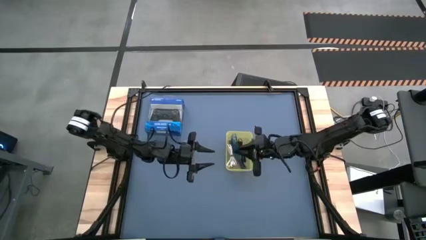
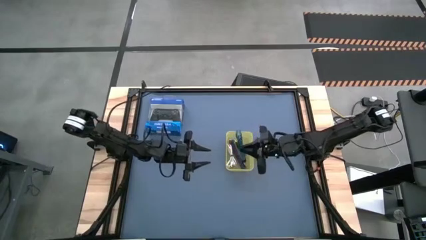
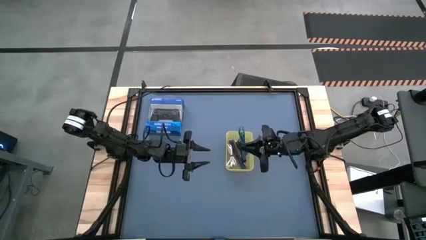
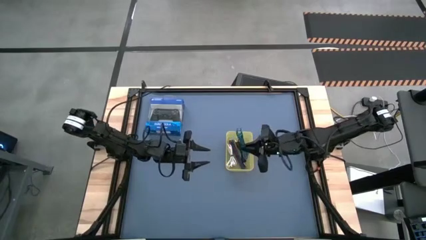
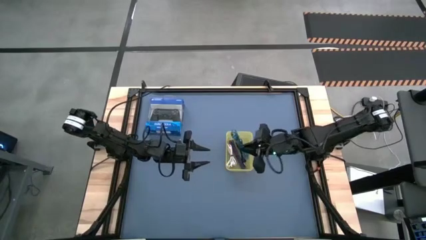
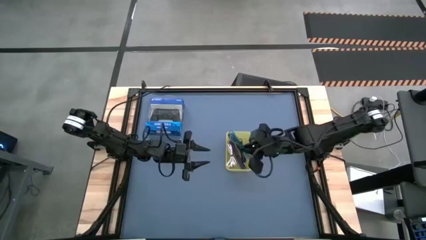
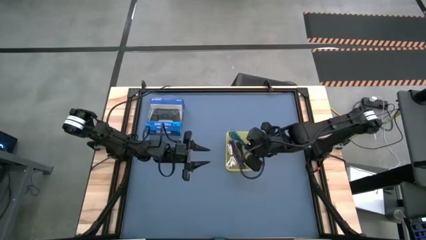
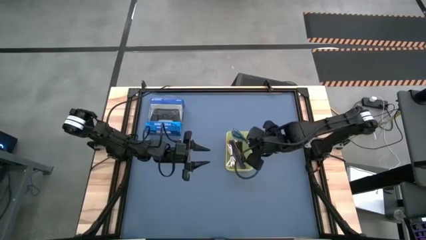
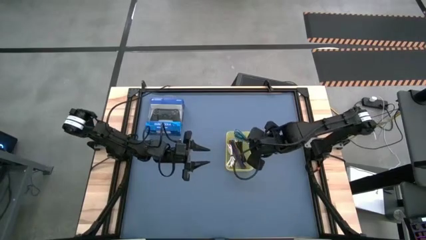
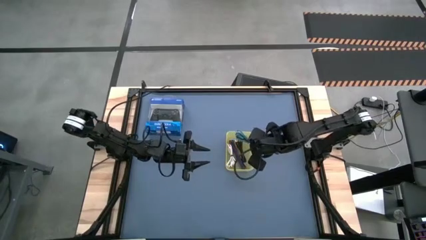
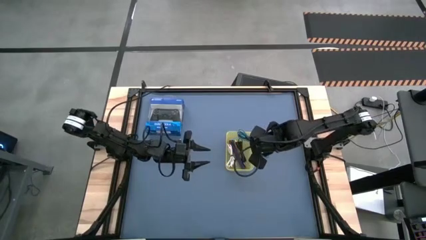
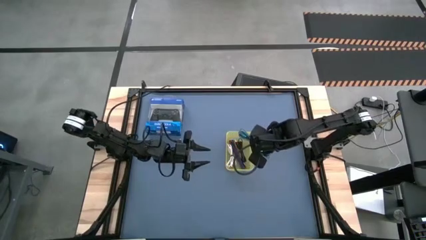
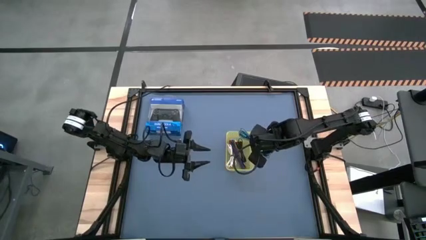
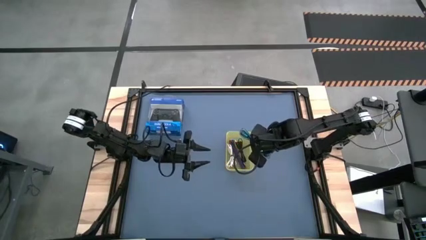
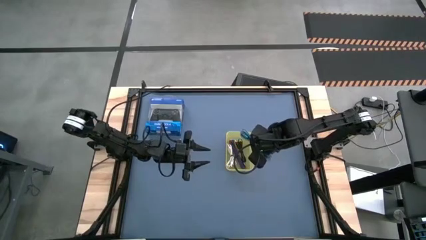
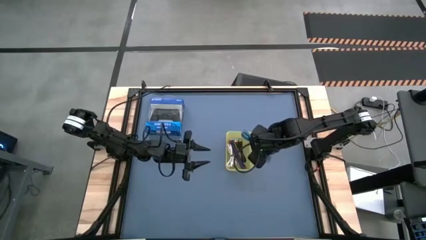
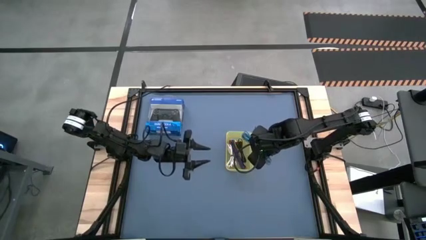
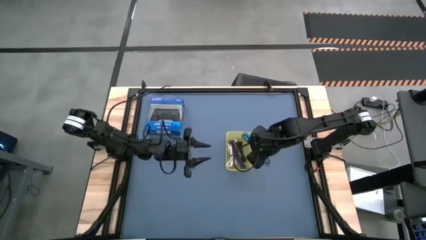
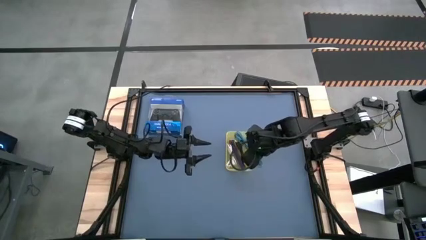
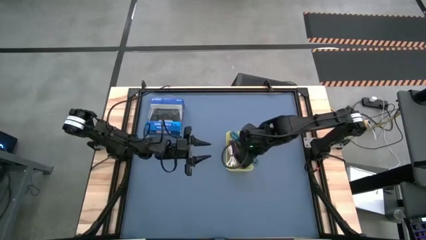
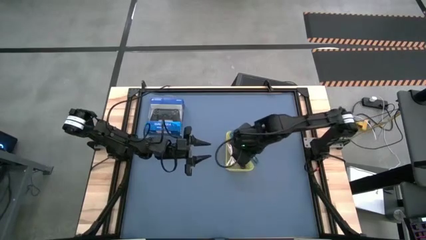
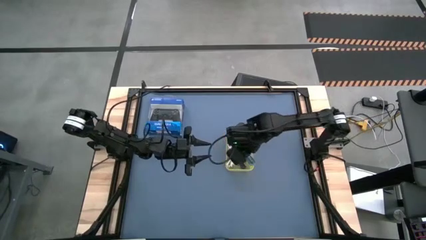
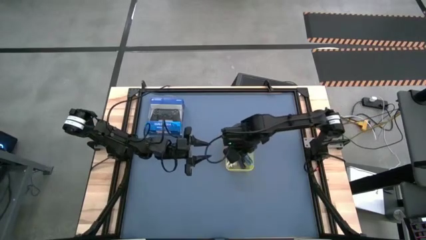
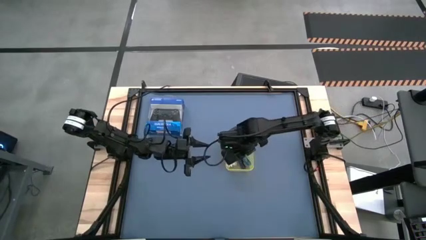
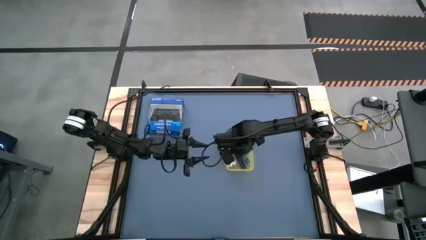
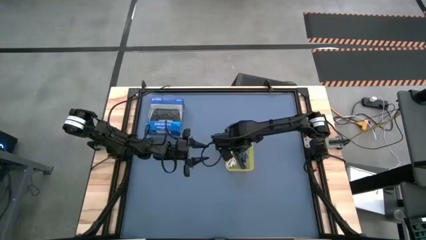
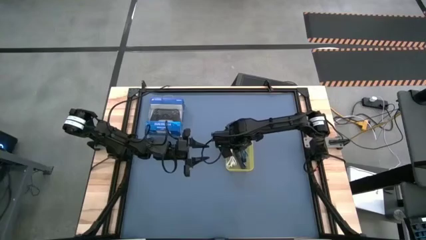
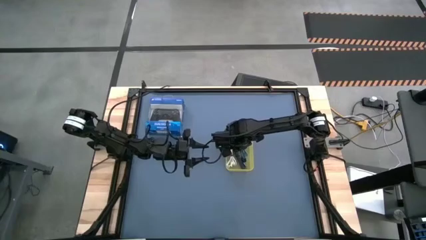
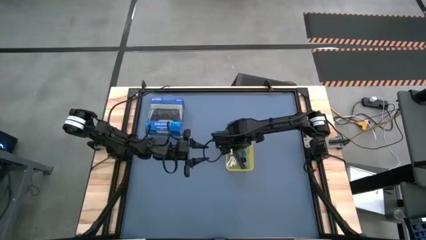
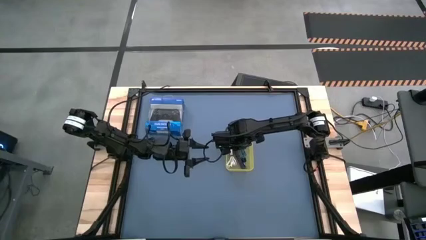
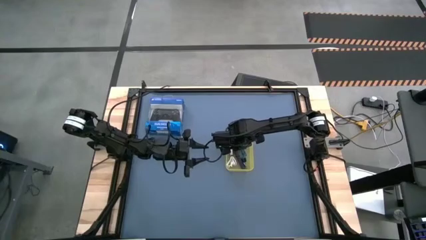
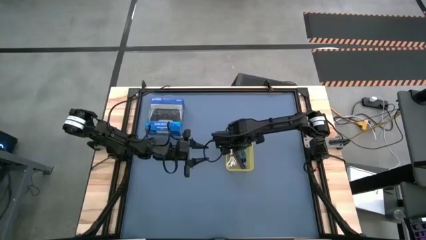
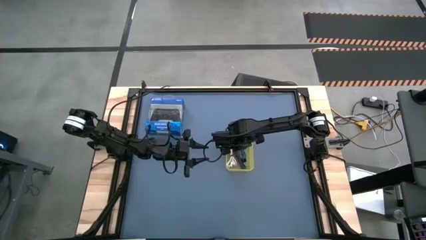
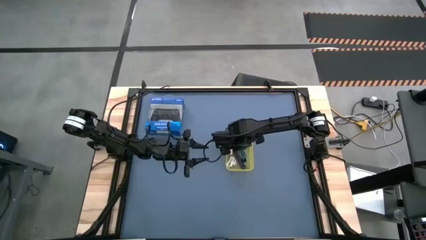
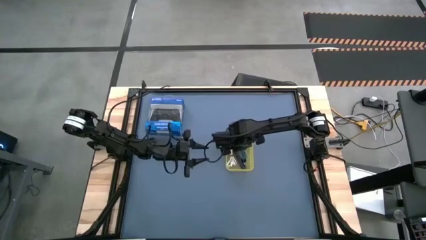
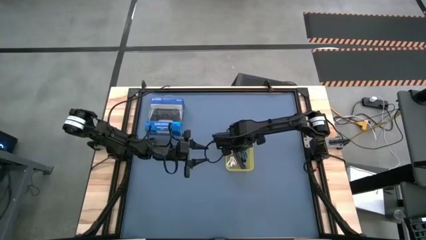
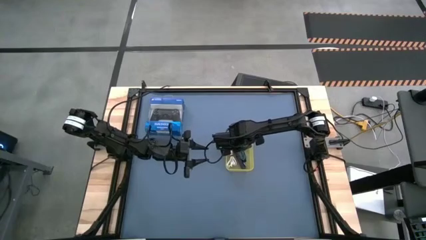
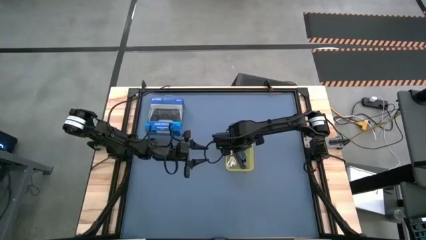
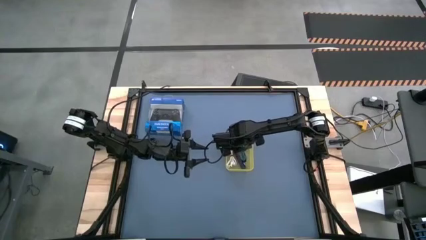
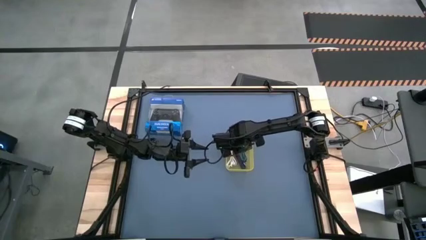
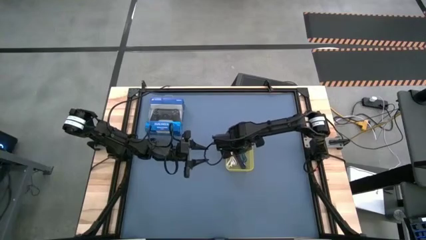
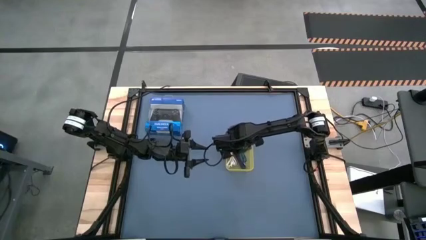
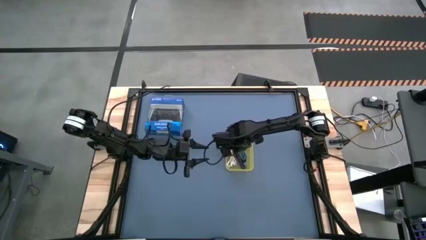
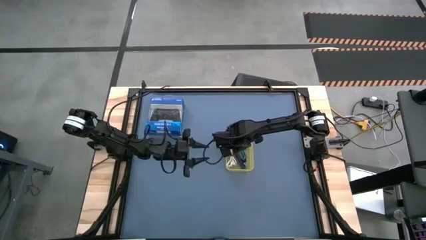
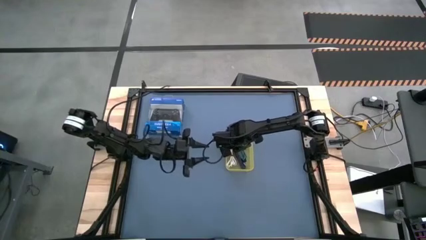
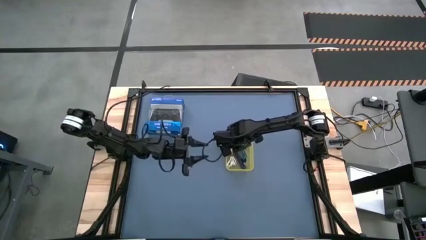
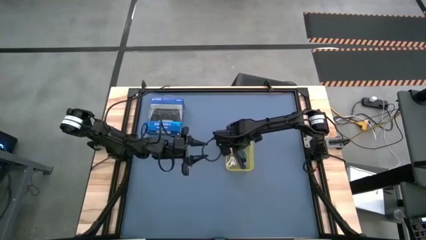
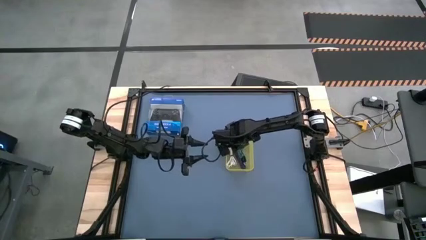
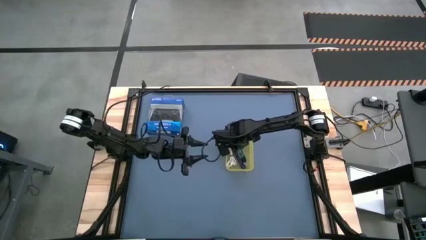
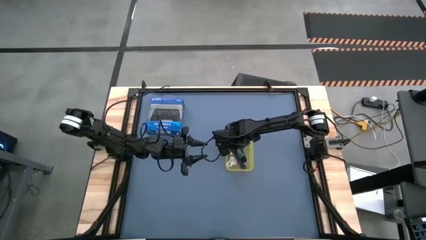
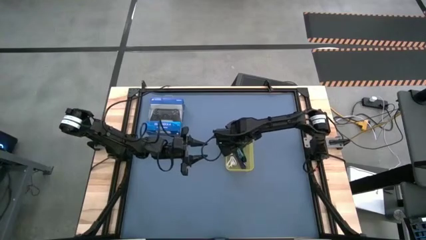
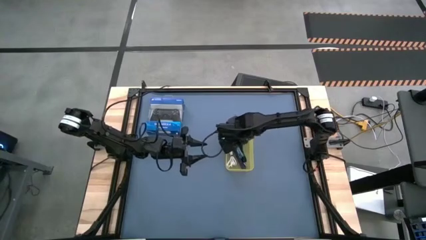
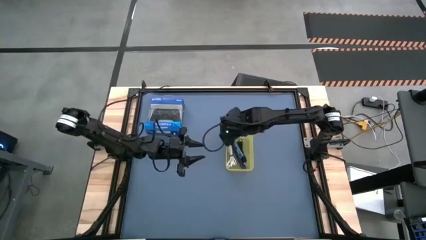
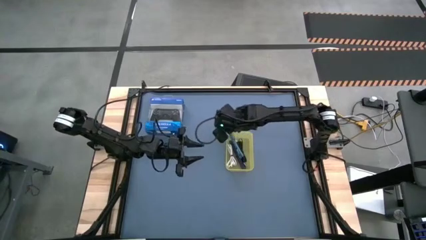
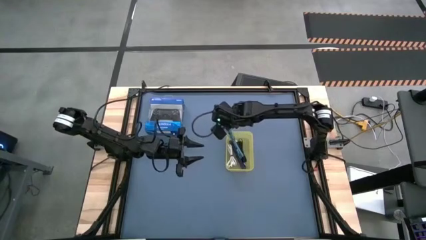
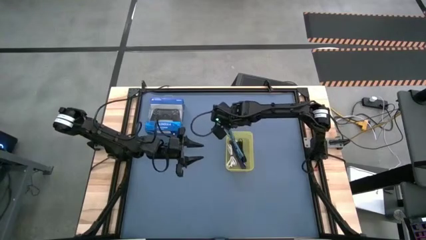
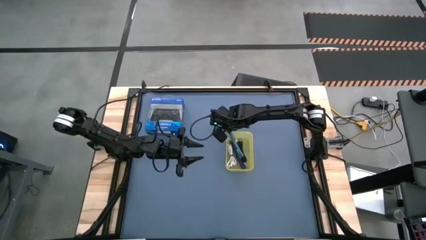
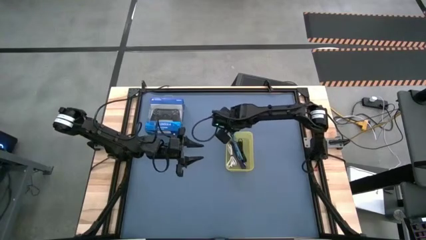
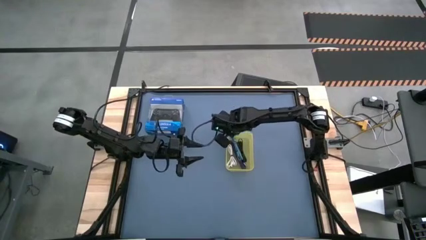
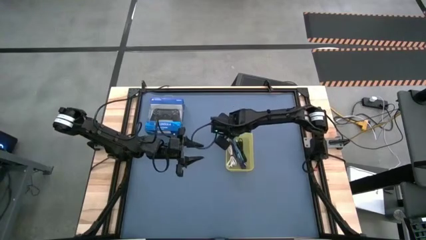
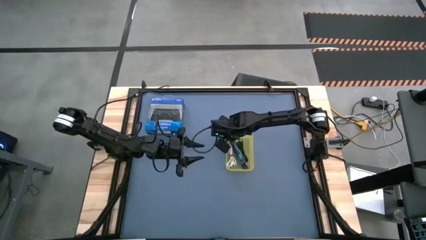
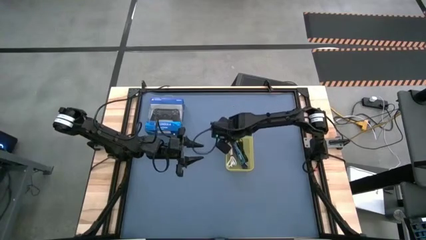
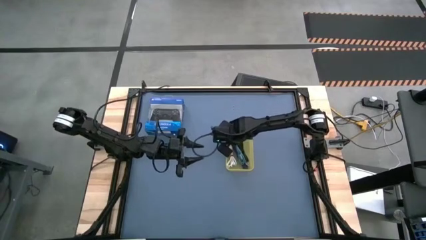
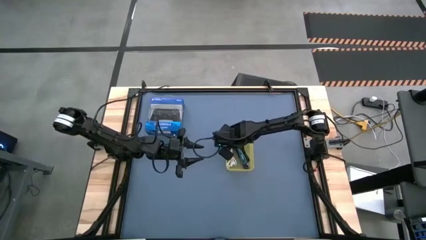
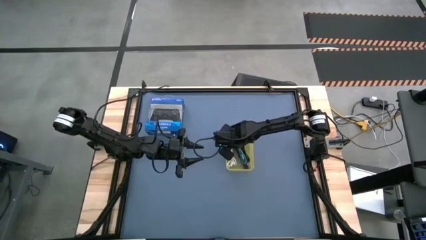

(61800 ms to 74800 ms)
Task: Pick and place USB-C Cables
Put the black blue charger cable into the yellow bin

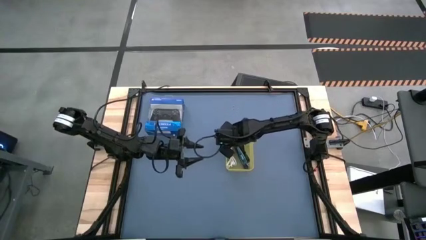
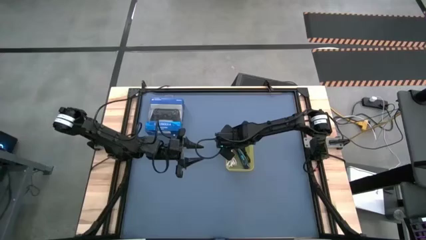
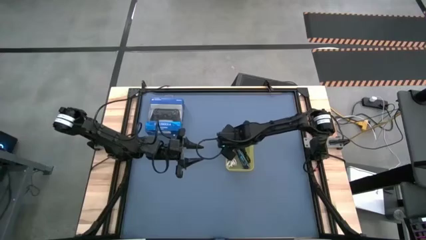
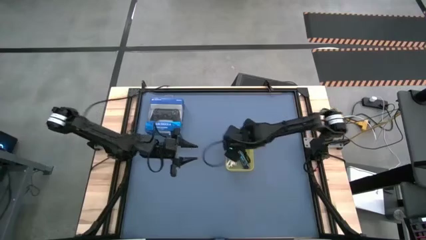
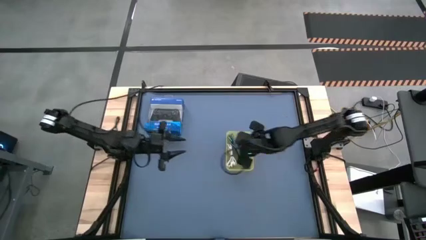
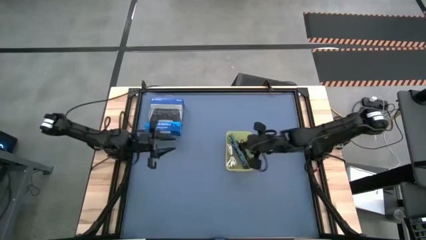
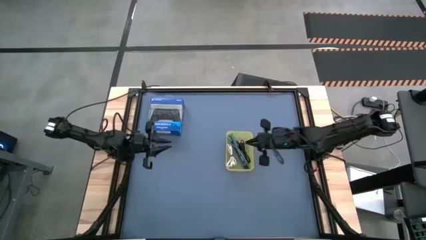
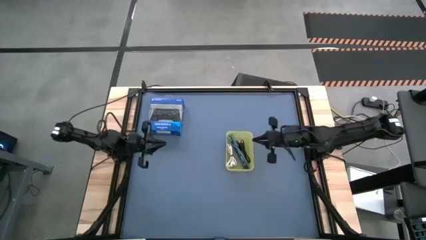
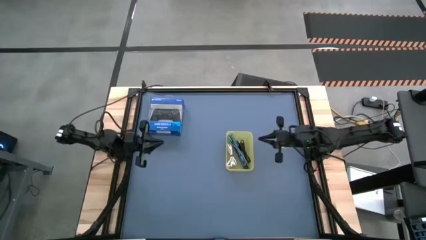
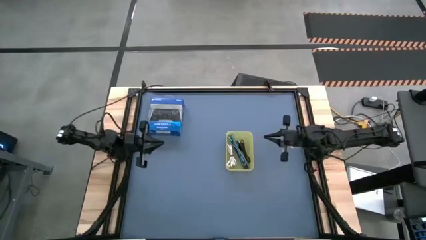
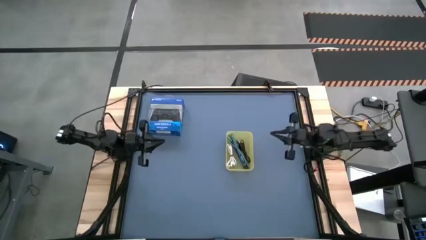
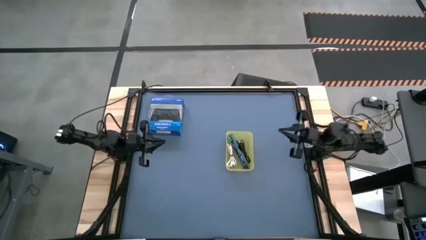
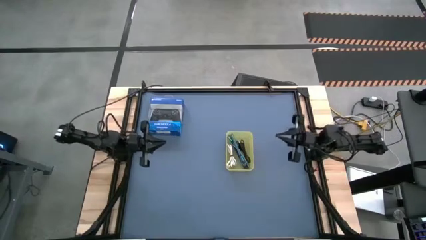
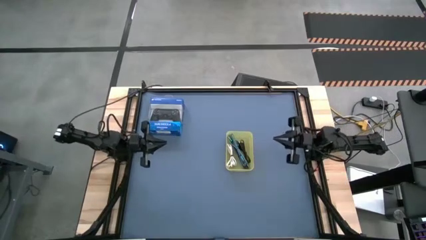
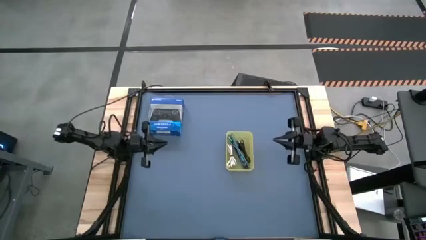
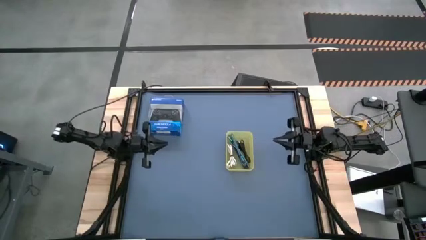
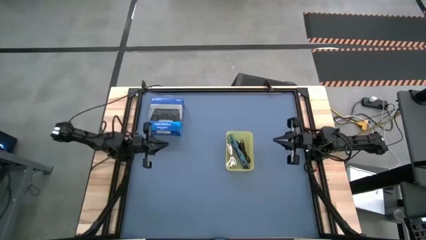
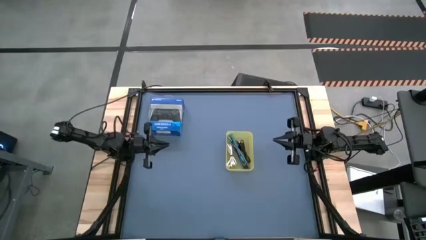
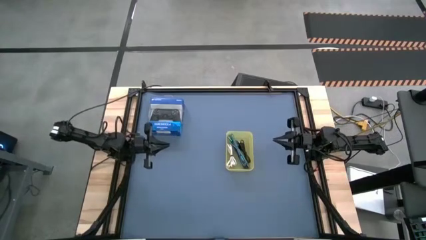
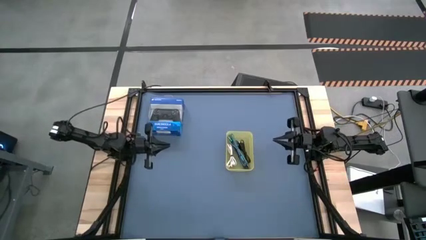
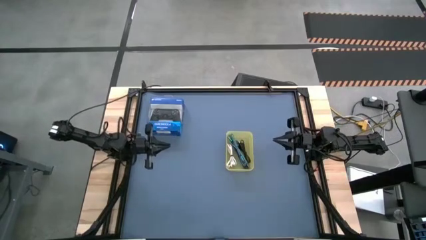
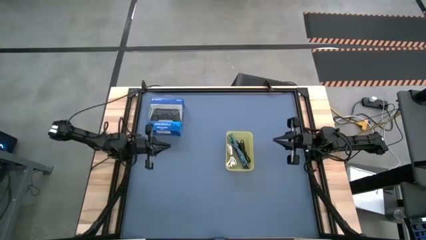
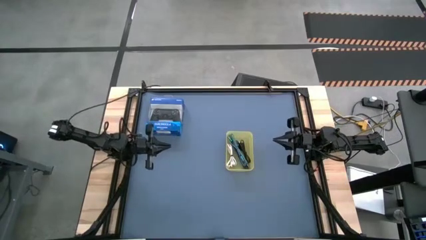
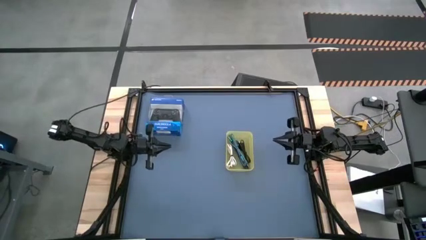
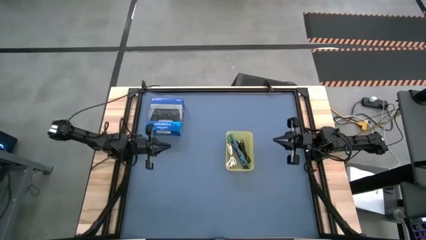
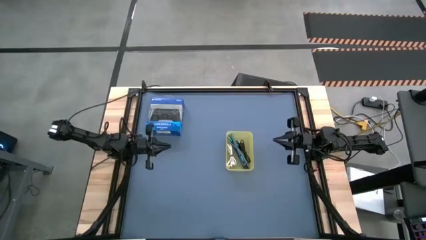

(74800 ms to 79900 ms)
Return to Home Position
